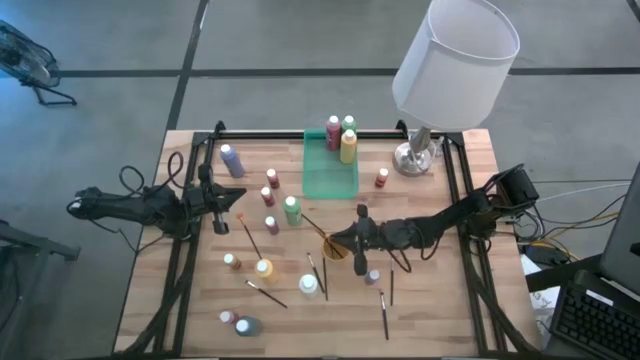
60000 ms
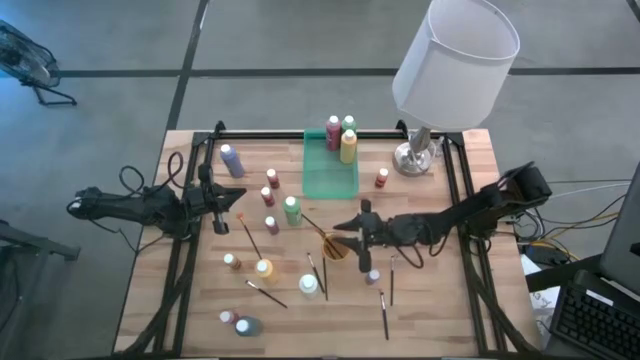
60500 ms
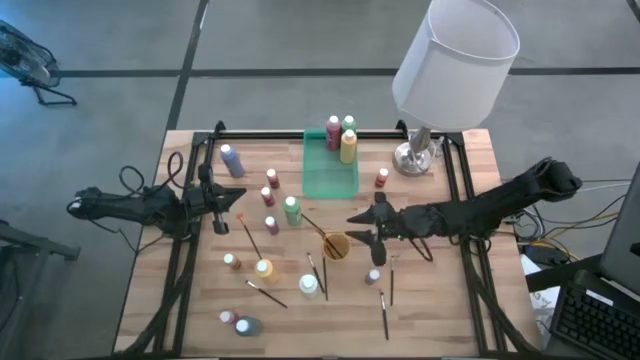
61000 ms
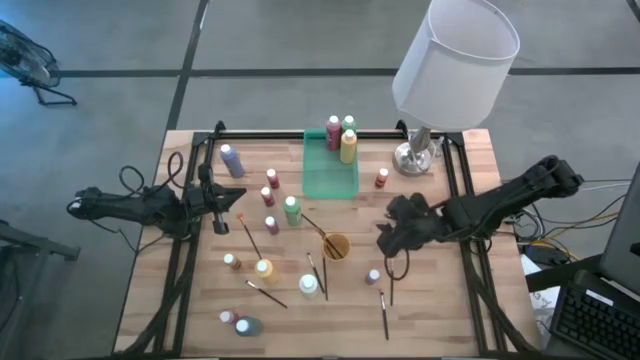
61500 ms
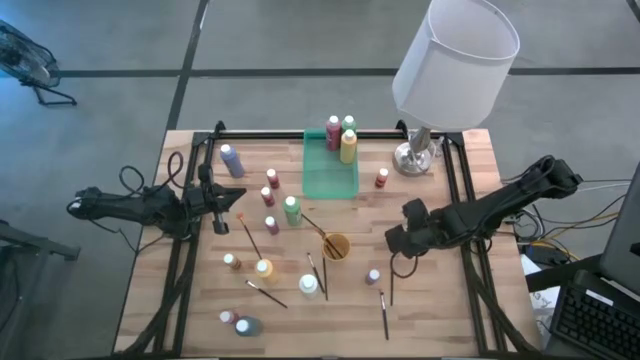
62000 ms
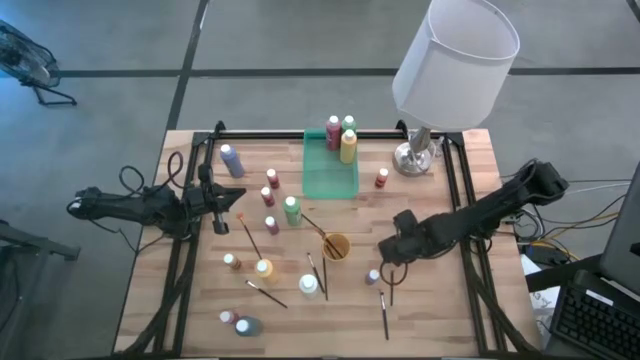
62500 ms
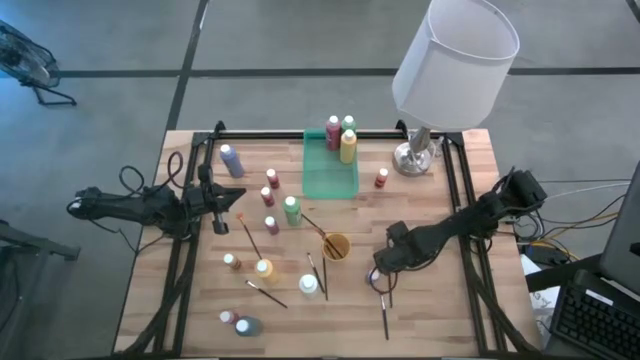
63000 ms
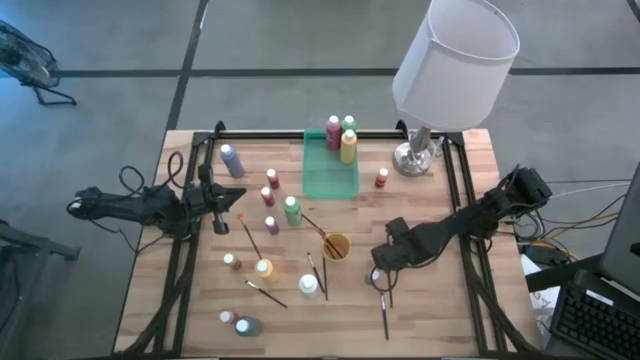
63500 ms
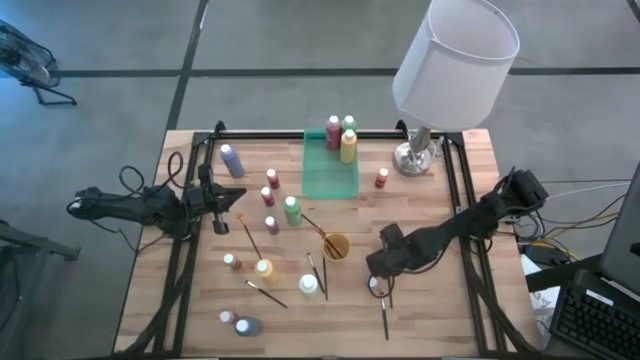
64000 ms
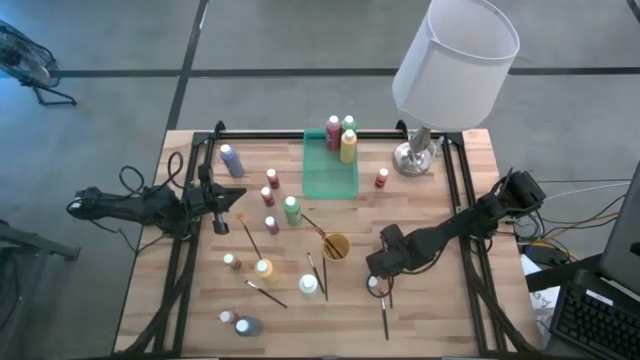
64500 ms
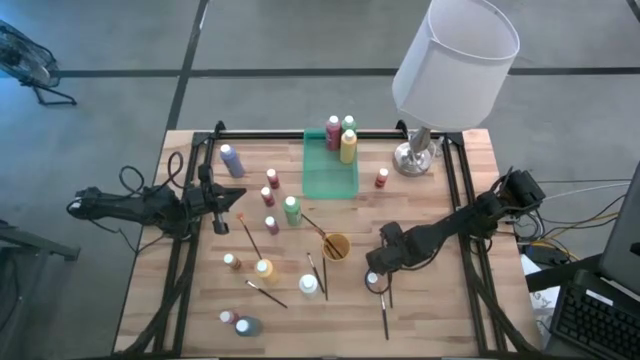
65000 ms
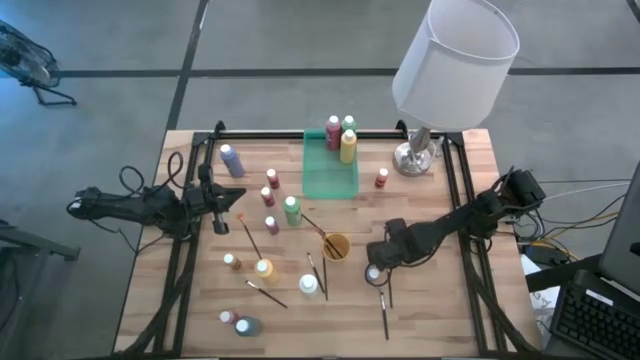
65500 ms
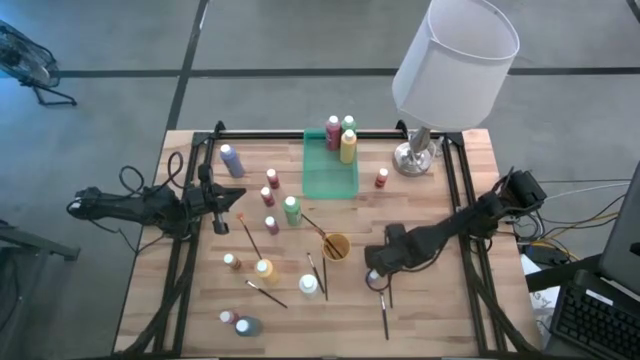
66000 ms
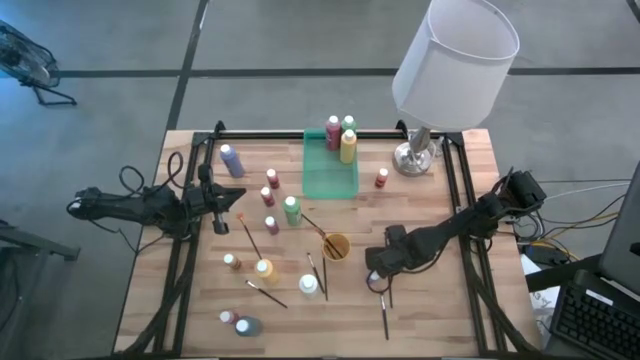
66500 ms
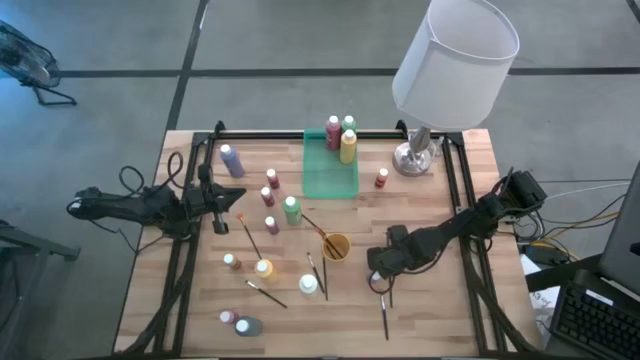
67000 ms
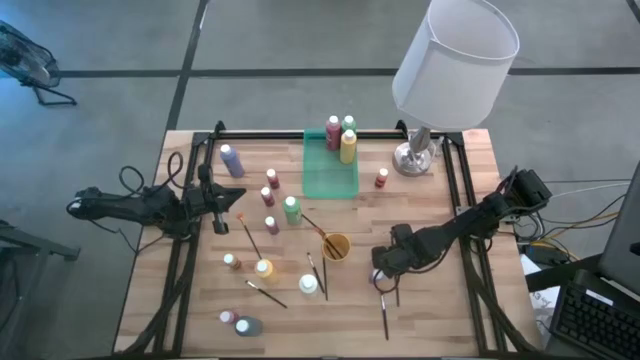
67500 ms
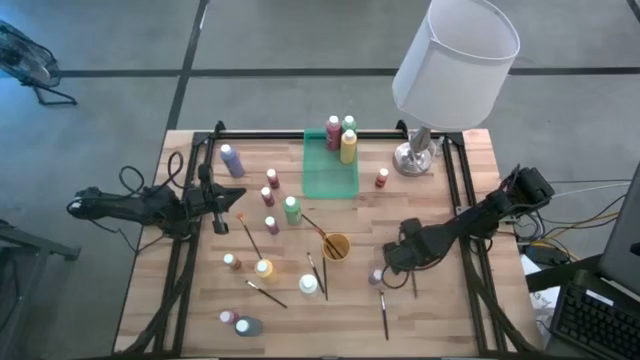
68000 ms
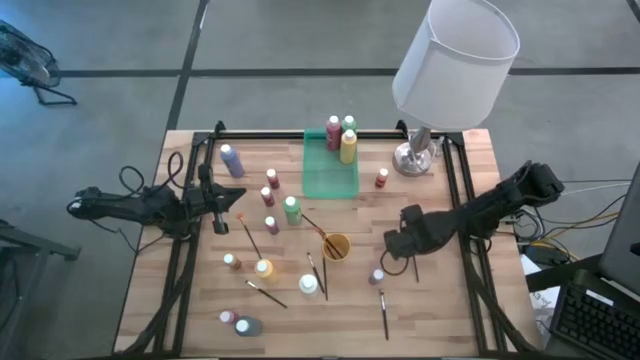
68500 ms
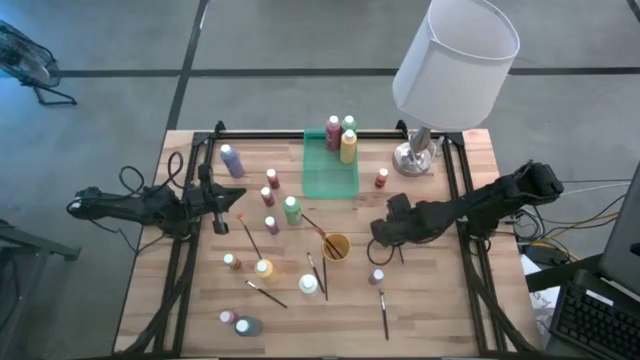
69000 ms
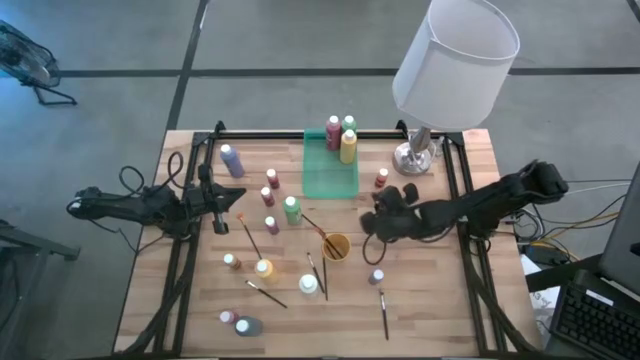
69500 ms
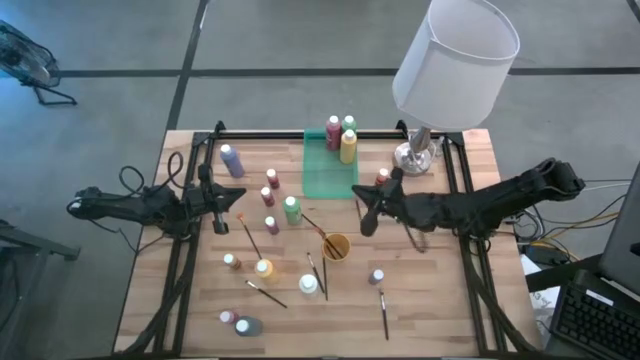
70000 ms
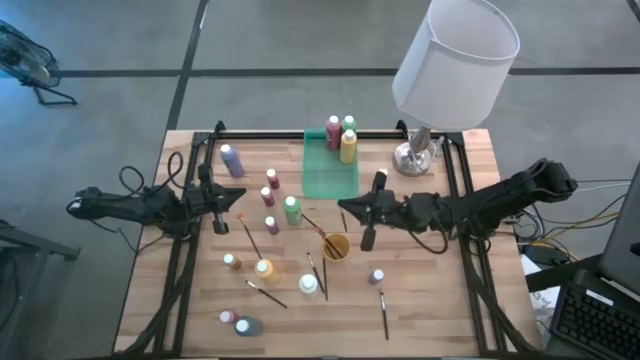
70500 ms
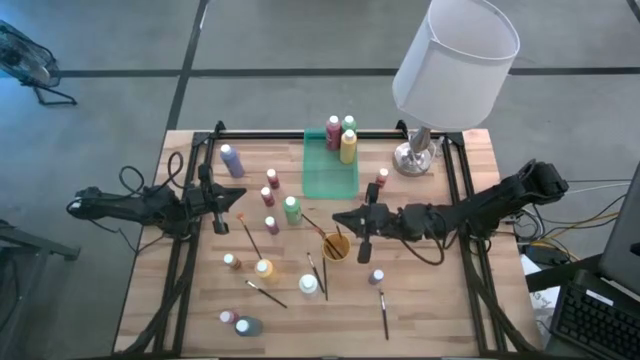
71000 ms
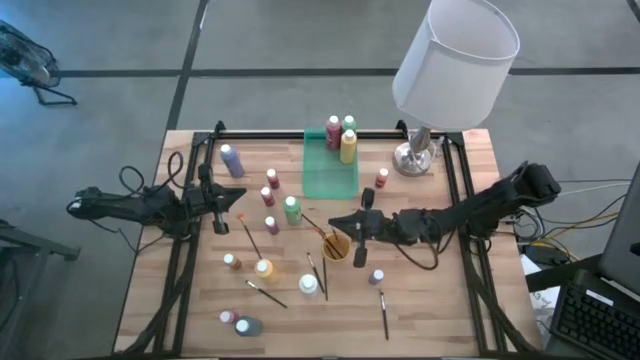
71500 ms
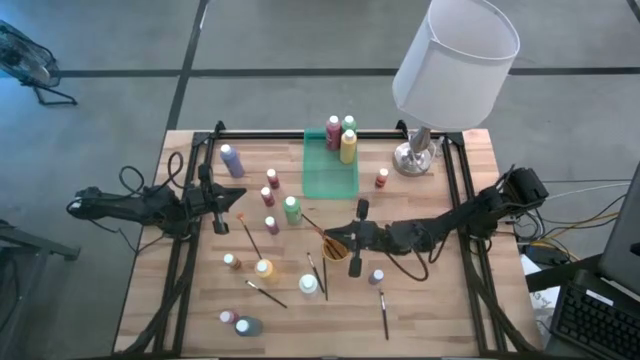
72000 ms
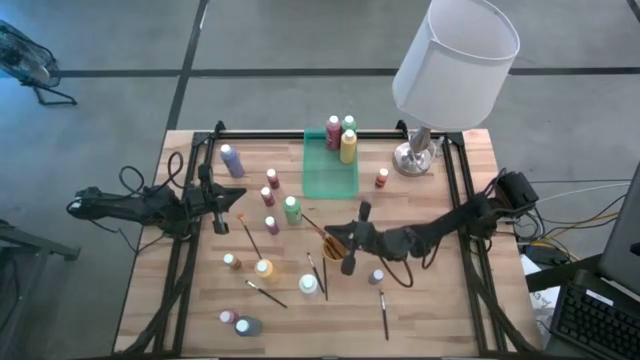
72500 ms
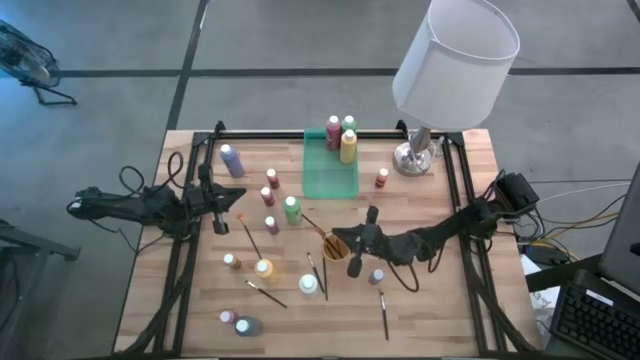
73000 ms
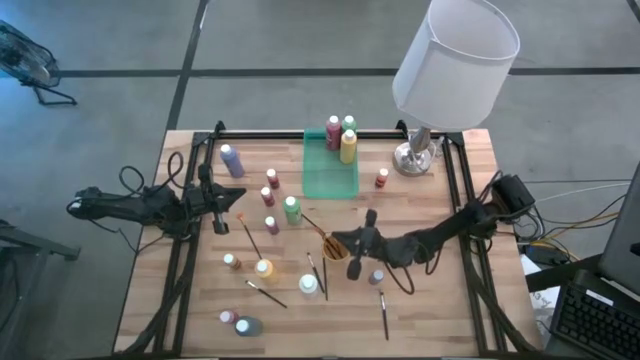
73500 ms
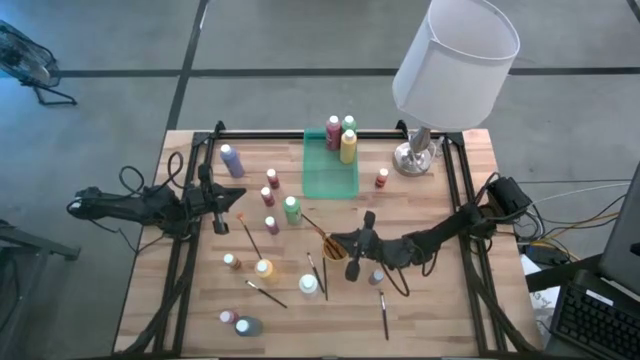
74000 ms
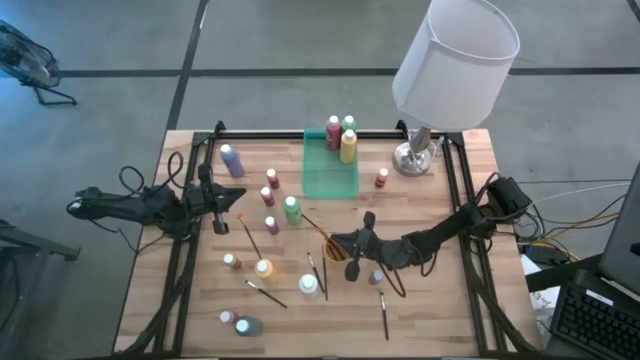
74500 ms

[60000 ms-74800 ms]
Task: Pick & Place Paint Supplies
Put the silver paintbrush into the yellow cup

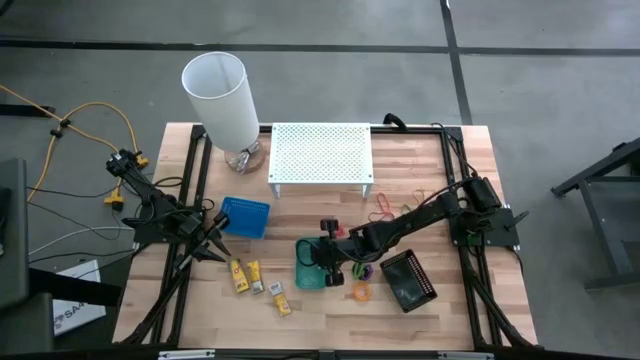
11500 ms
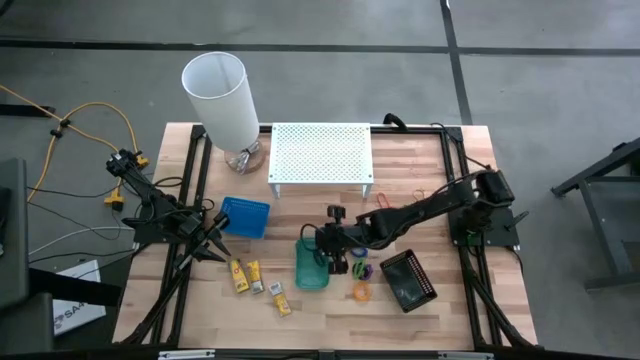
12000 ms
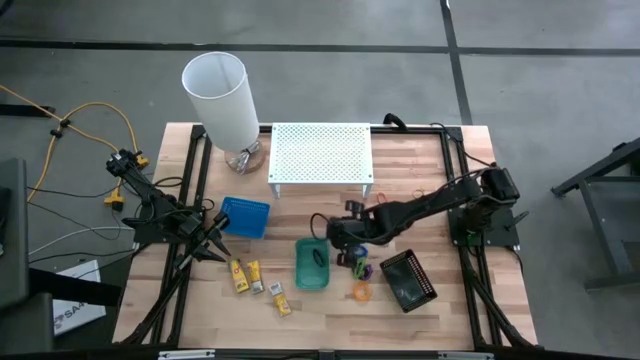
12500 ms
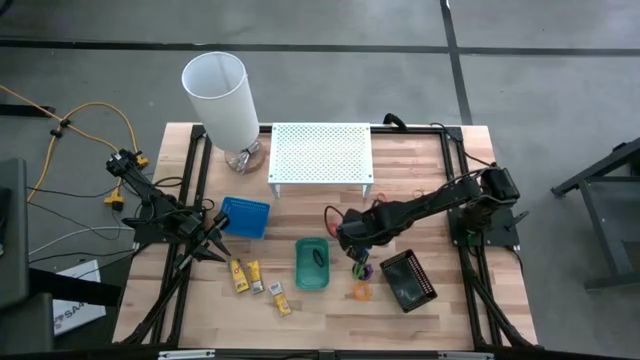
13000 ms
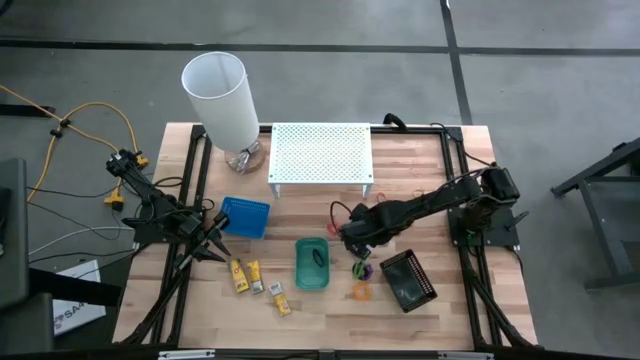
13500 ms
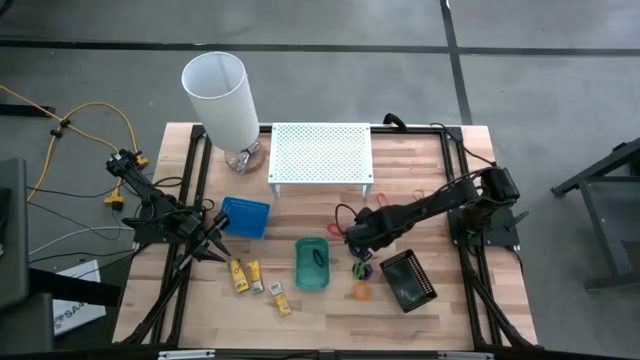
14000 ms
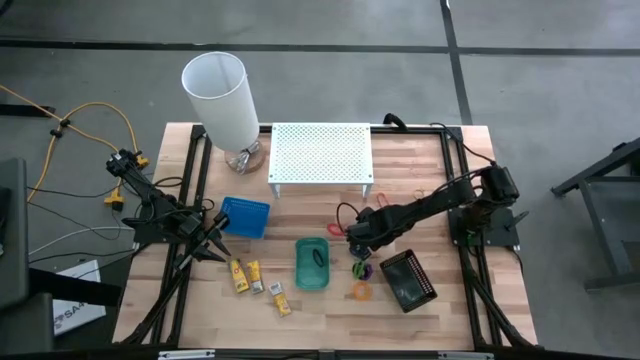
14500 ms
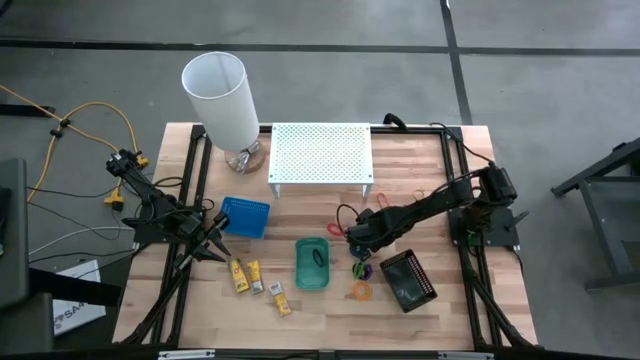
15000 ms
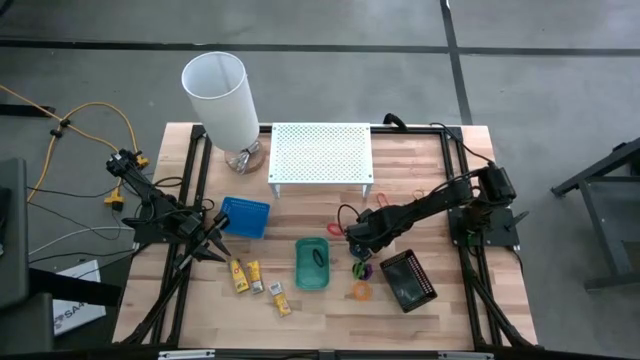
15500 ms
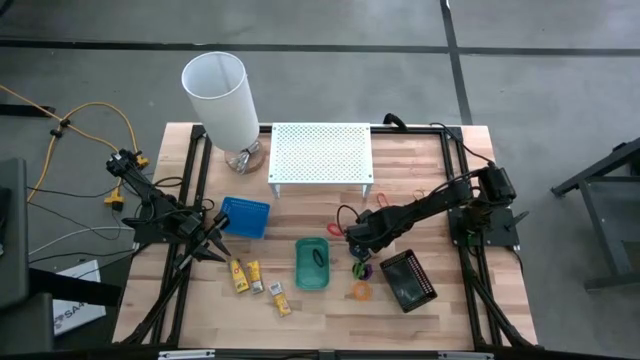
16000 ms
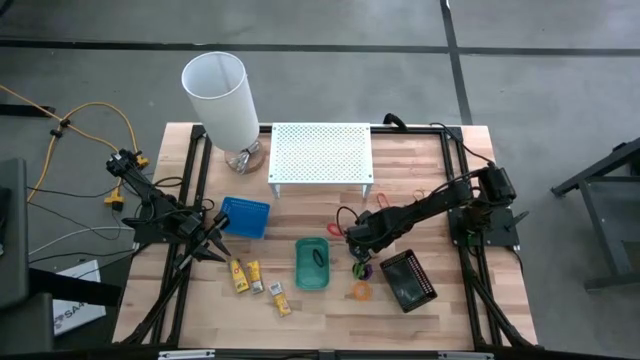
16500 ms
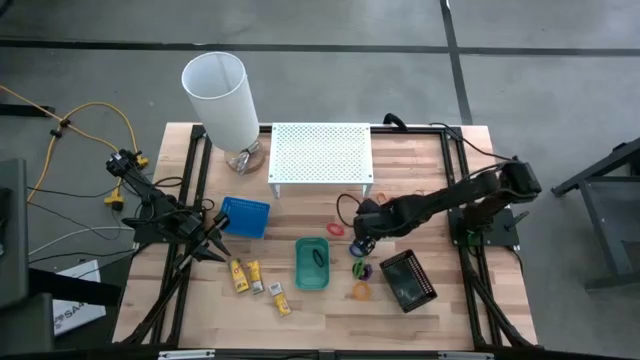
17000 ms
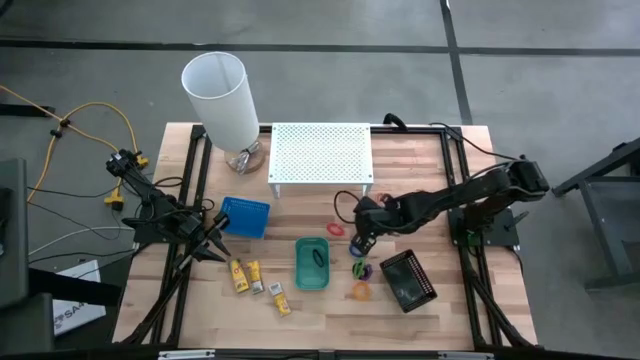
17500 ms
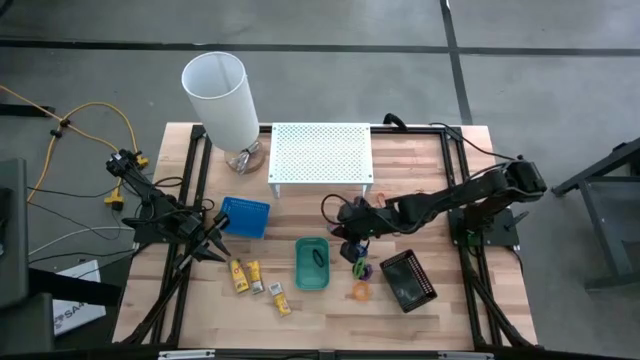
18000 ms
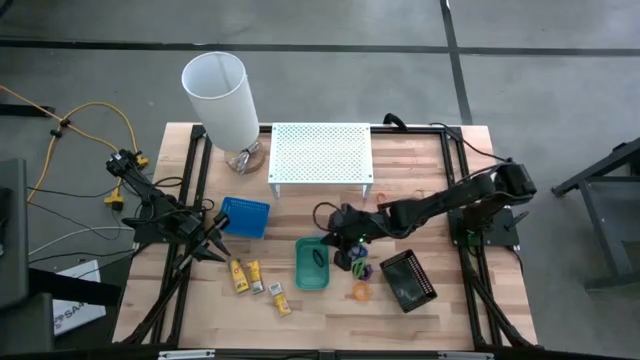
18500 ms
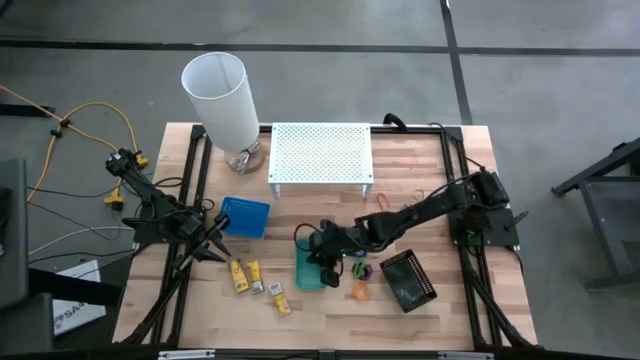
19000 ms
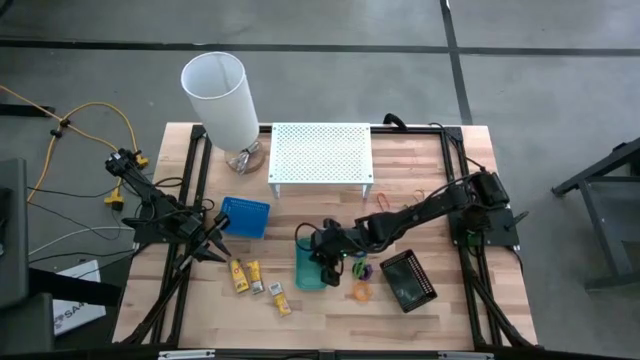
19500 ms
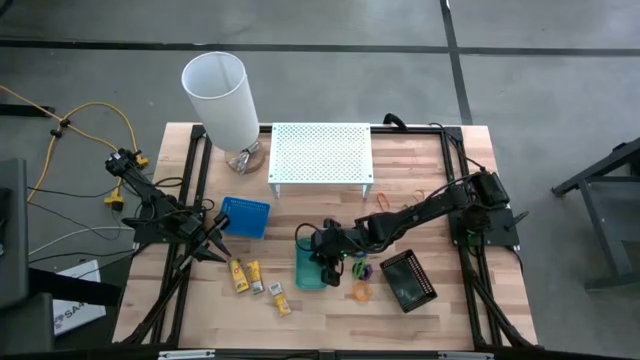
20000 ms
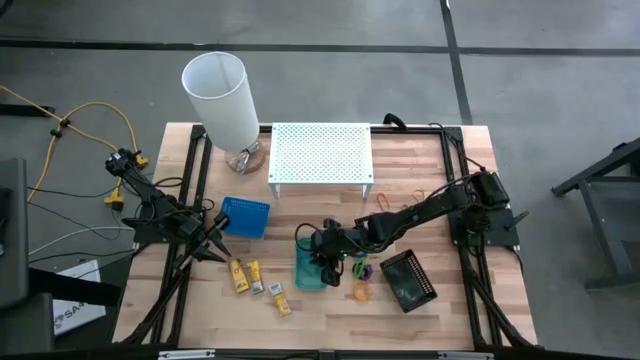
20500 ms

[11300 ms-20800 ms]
Task: Pick & Place Office Desk Supplies
Put the blue rubber band into the green bin
